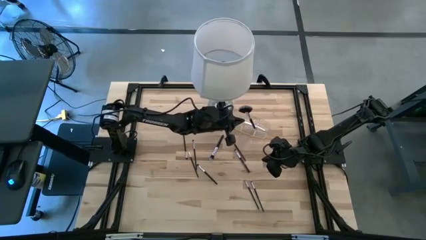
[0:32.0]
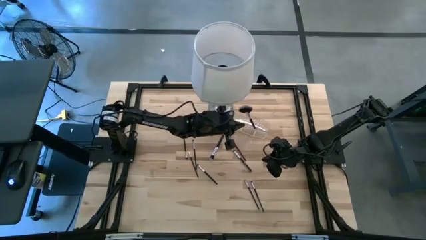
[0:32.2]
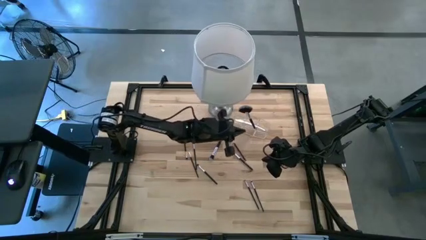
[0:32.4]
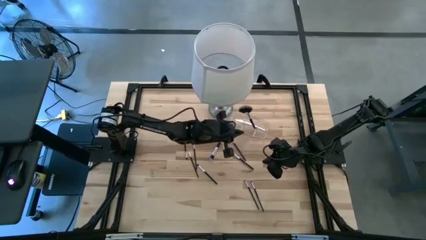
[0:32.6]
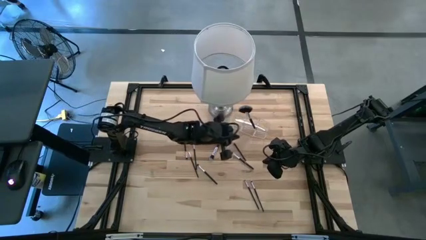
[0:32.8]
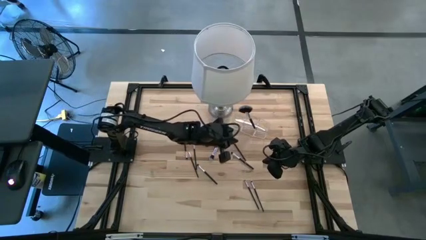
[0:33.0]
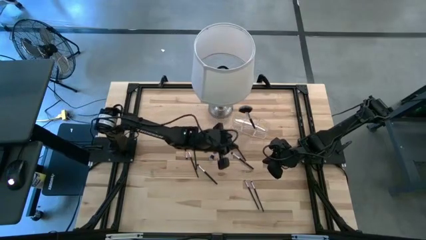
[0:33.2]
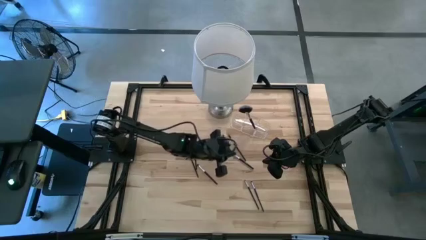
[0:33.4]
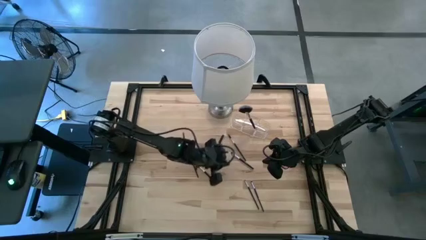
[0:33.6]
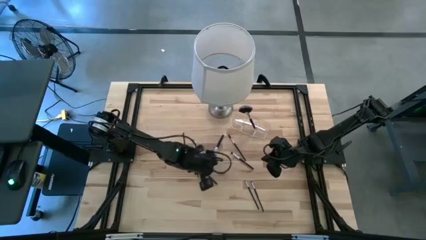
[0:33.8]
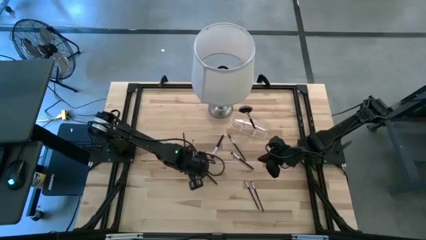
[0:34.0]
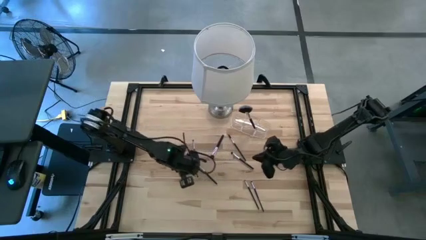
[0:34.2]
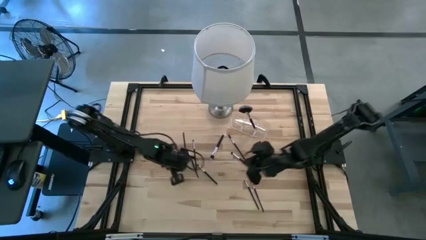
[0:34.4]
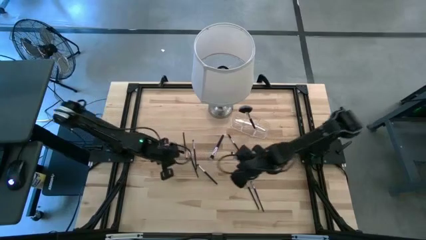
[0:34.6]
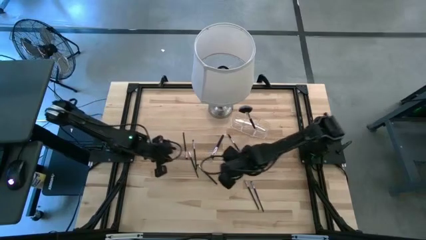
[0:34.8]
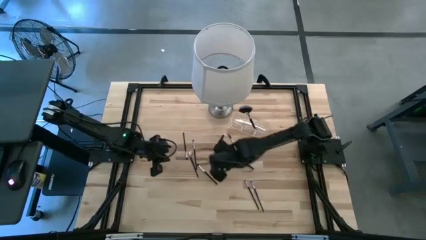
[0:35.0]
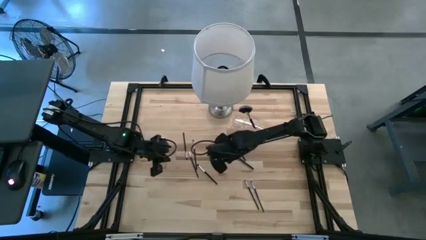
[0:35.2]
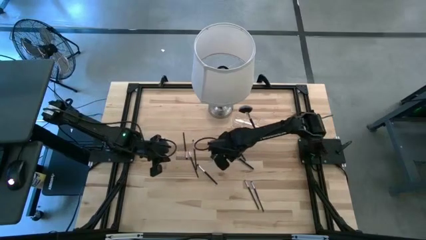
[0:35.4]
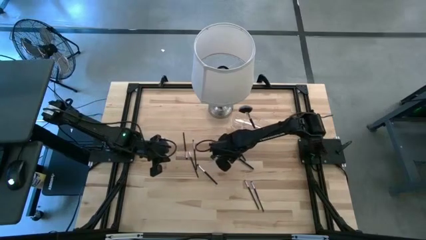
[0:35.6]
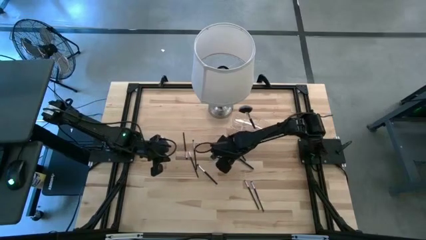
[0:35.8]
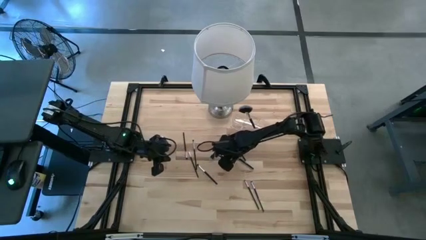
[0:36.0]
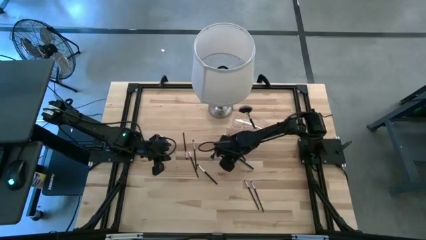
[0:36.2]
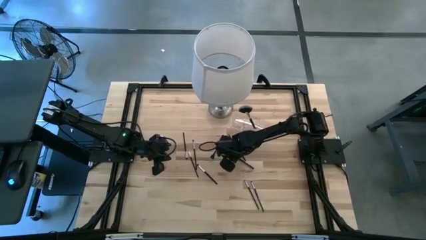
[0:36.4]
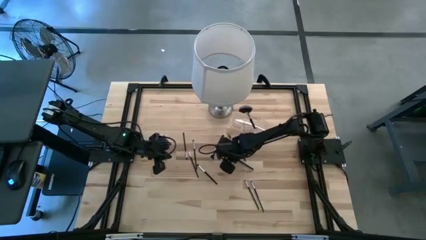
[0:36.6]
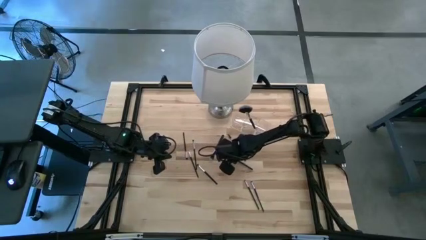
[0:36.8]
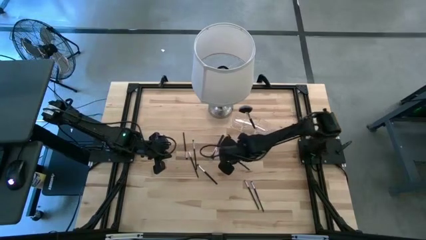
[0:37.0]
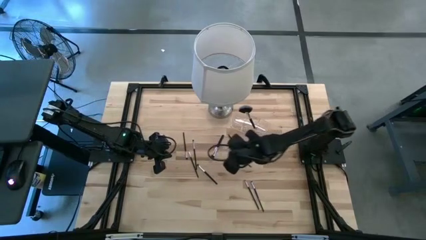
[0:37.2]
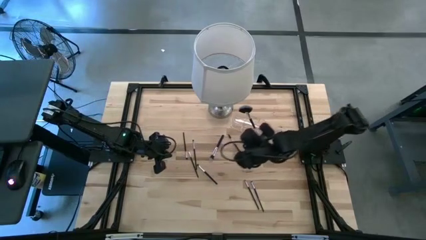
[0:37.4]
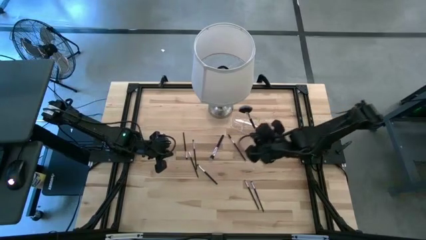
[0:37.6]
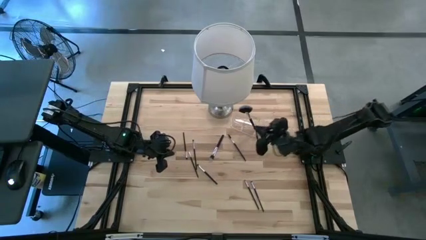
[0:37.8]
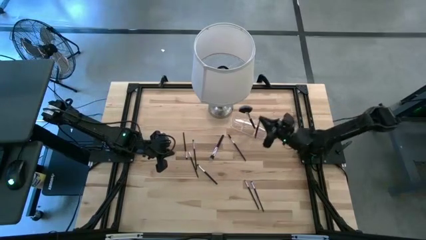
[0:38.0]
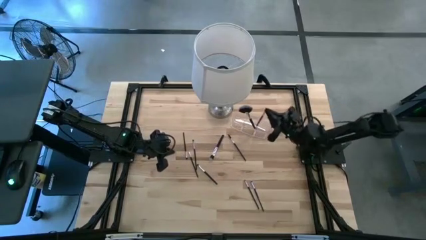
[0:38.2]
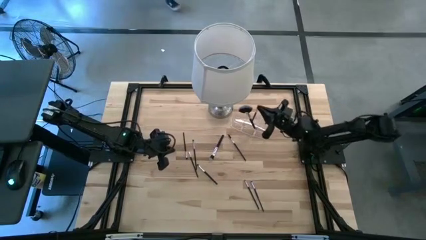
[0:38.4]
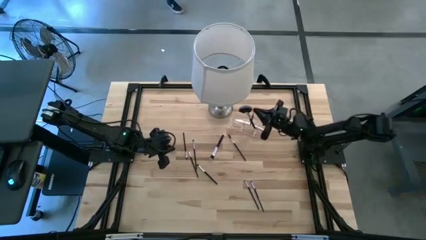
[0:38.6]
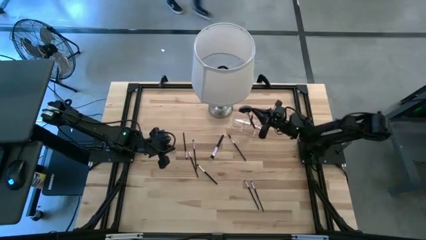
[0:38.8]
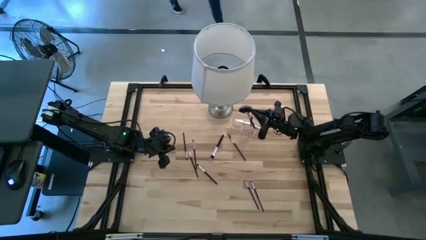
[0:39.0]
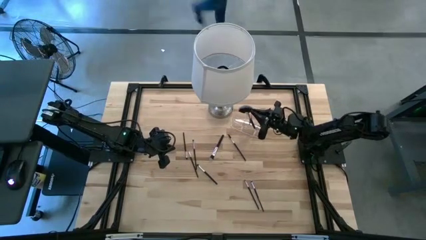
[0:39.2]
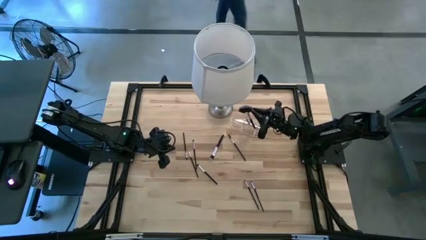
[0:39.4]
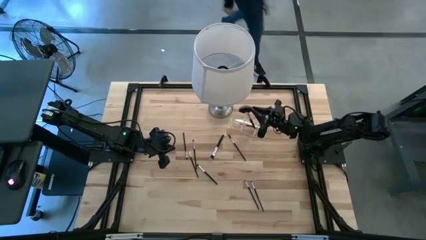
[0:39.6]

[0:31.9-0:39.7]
Task: Put items in baskets/containers
Put the black eyeshadow brush into the transparent organizer

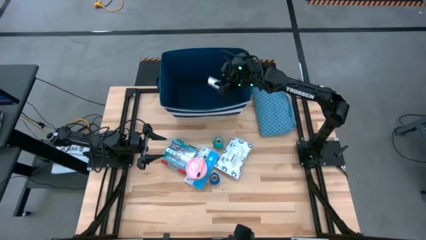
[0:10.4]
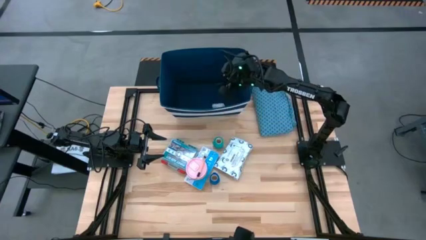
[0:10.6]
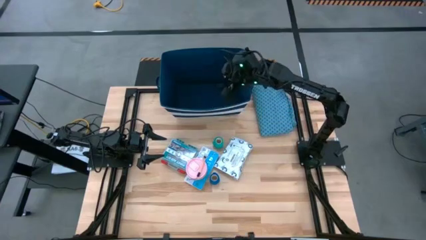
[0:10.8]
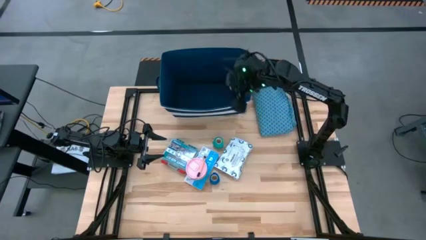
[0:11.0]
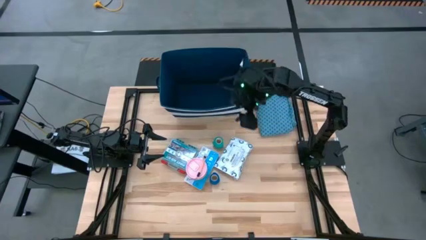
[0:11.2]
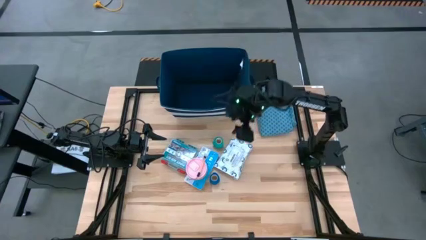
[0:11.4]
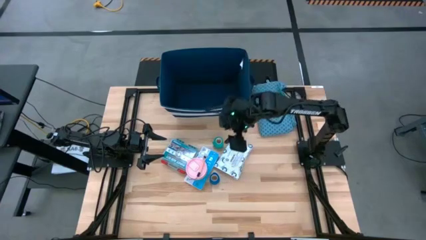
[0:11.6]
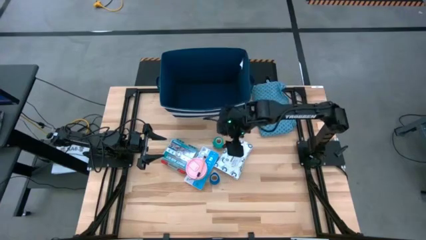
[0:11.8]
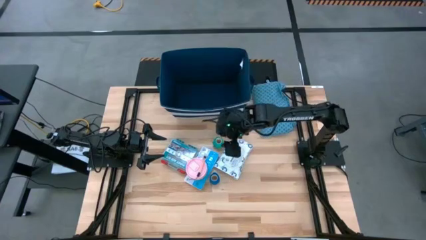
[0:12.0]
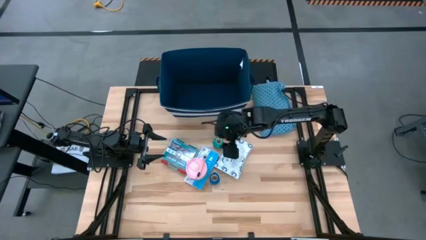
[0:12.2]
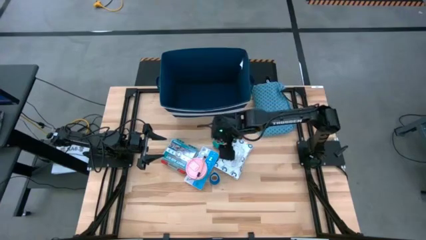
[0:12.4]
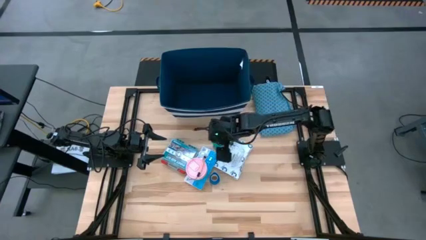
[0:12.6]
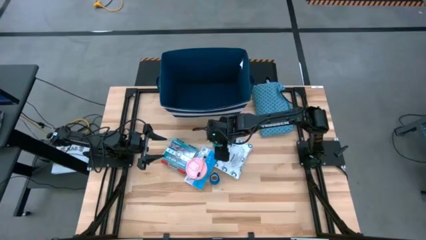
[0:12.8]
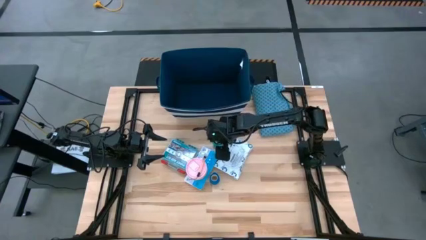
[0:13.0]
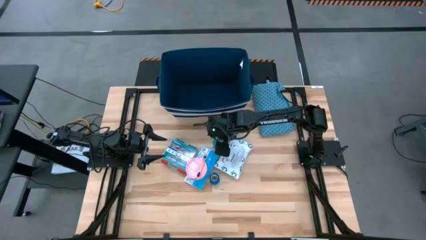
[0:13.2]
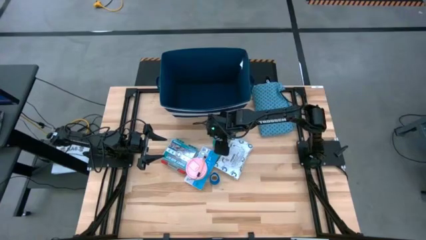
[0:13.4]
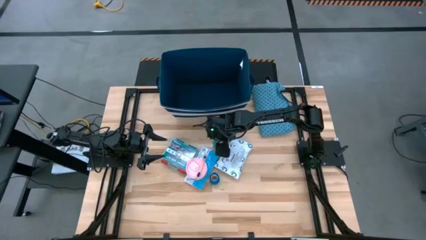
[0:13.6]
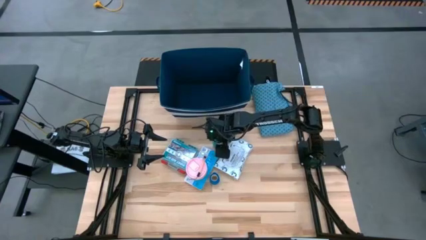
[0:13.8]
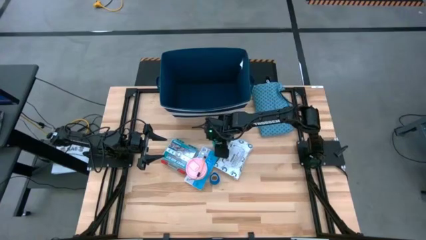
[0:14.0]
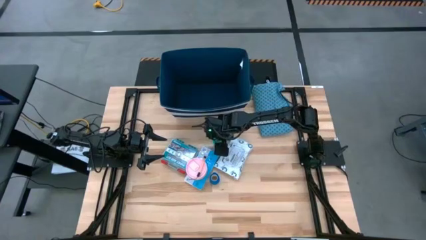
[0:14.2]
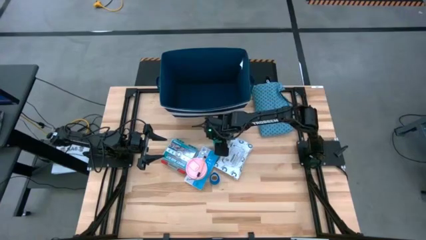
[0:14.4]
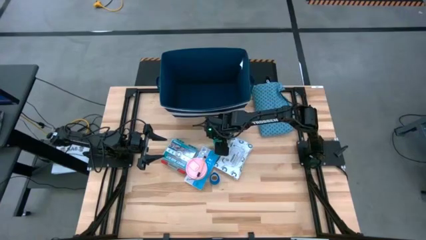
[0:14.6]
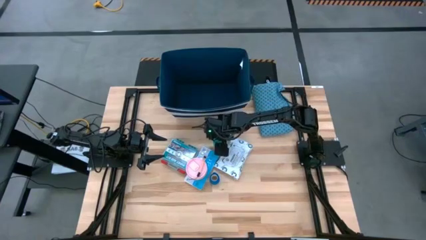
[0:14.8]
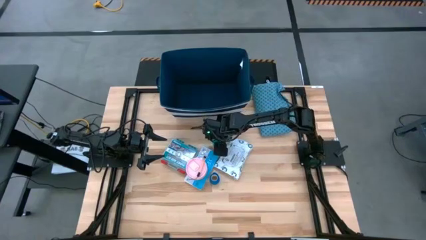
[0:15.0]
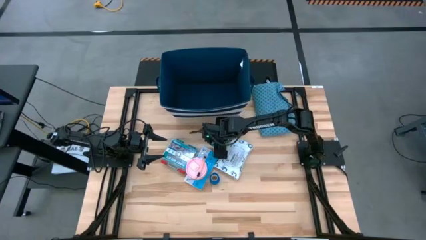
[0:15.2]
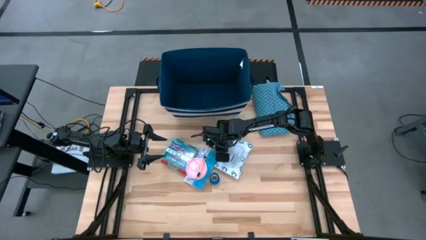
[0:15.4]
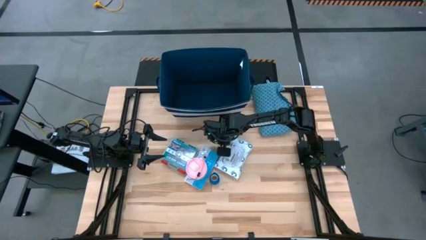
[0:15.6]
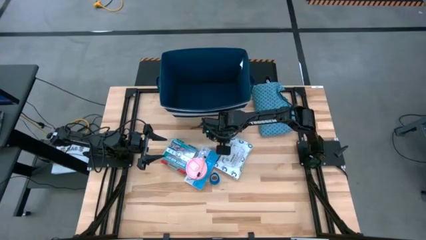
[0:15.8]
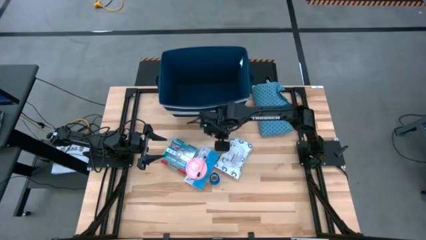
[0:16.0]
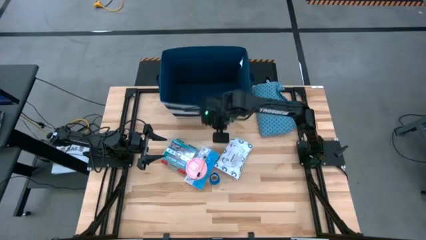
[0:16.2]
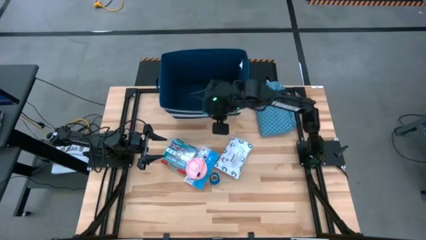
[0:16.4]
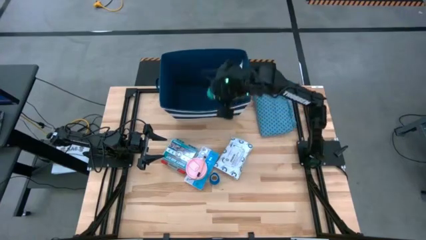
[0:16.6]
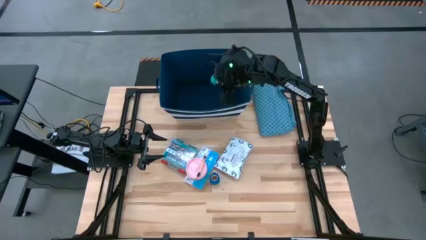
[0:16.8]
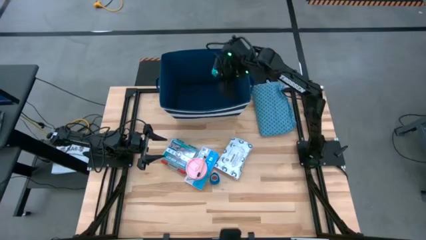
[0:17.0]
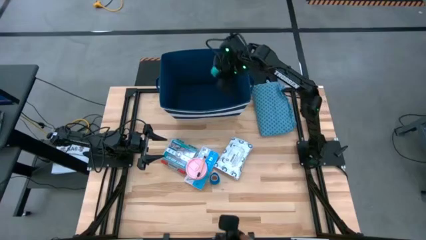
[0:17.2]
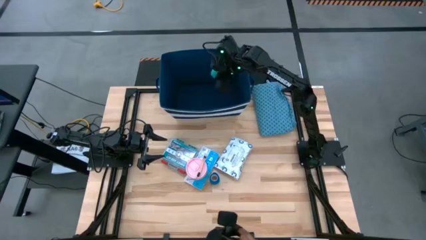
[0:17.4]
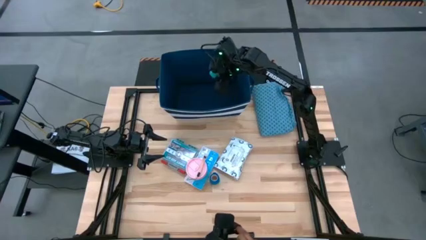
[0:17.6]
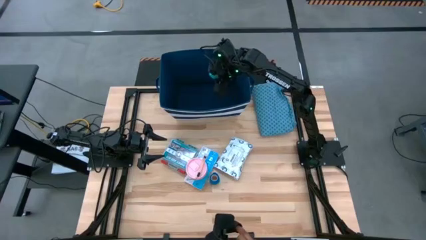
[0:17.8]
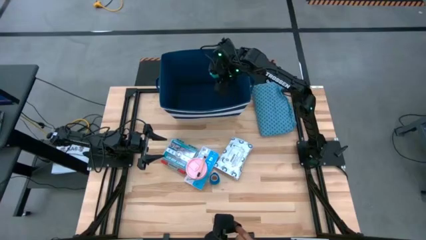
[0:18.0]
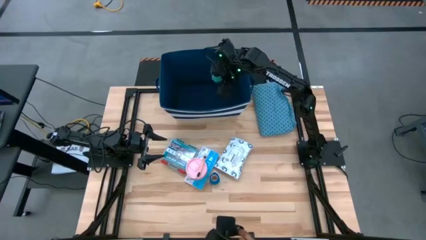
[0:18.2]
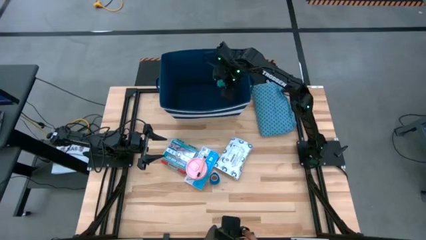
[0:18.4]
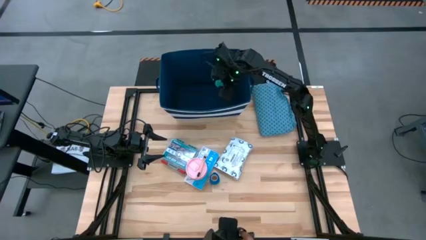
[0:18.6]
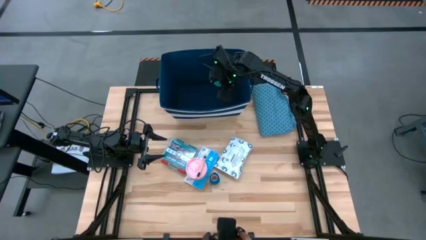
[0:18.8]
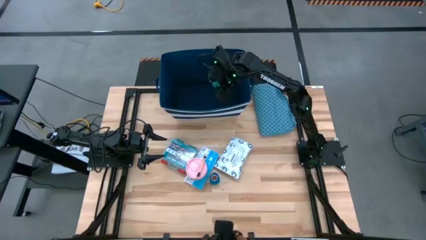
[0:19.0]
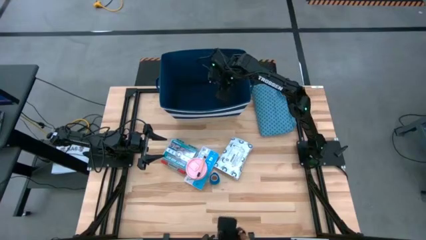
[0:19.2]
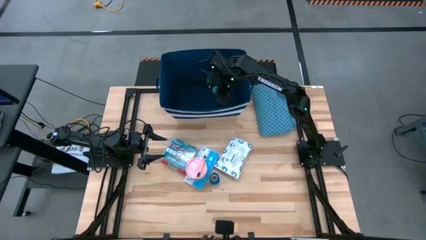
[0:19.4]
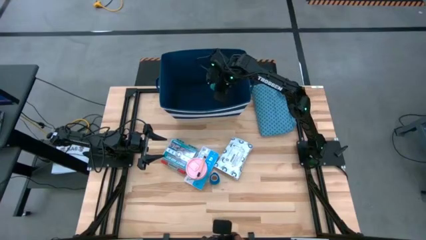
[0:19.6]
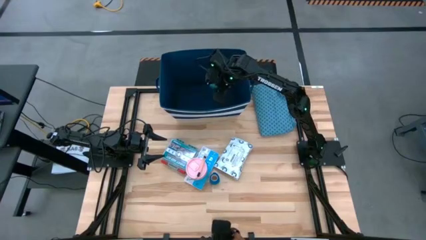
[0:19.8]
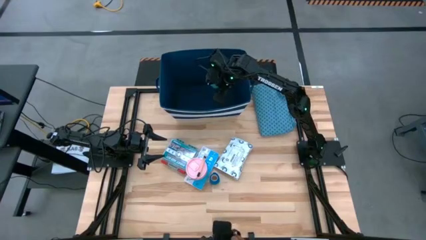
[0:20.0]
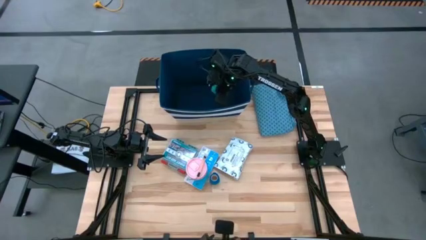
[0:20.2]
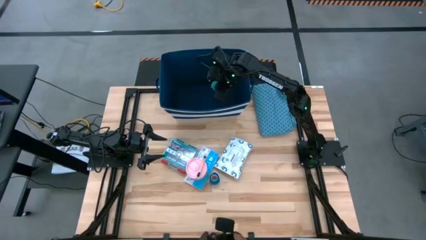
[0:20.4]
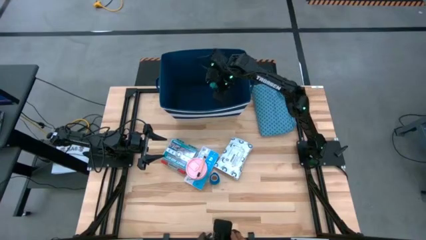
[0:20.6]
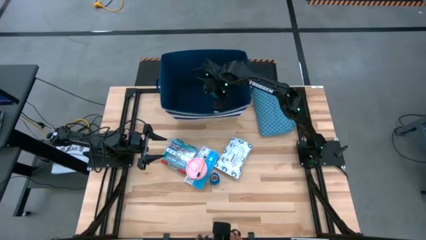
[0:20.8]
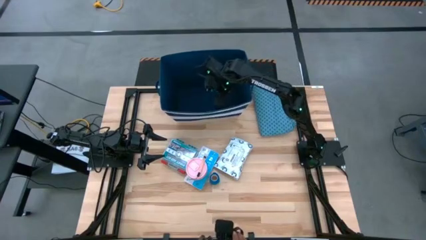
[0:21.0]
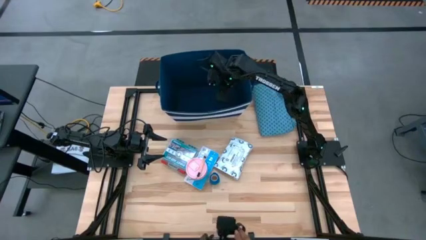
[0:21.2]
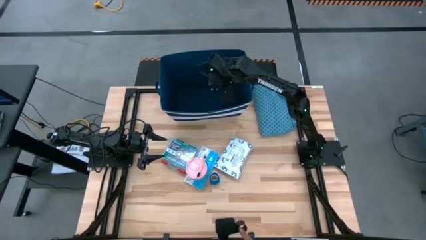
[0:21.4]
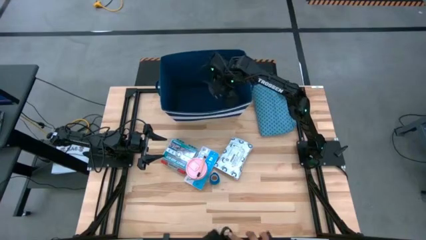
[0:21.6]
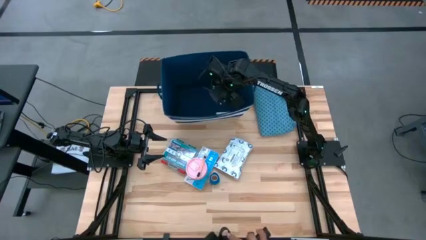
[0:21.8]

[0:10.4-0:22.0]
Task: Pack medical supplies into shirt
Put the green tape into the blue patterned shirt
